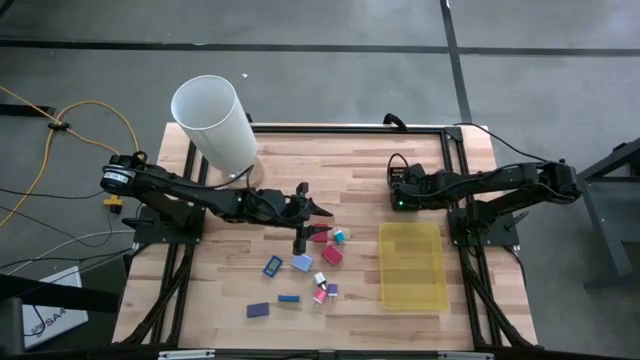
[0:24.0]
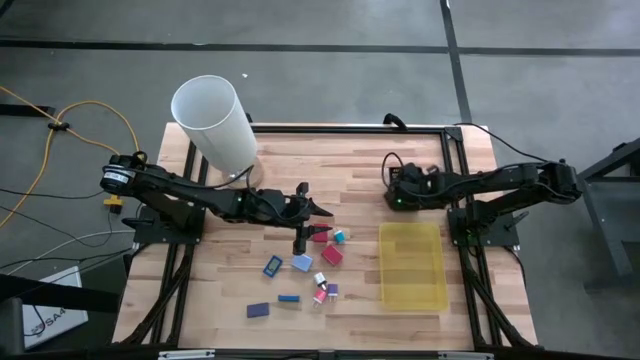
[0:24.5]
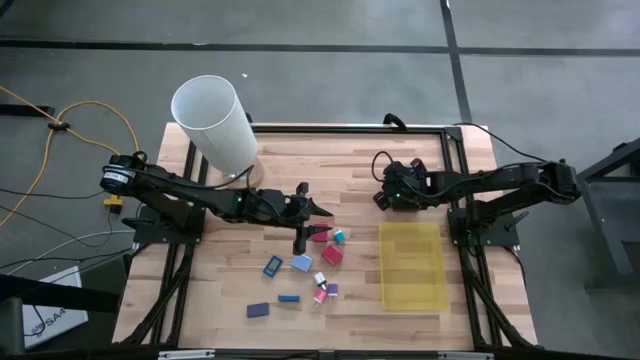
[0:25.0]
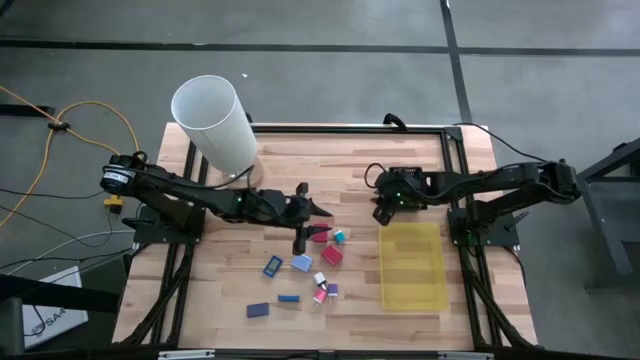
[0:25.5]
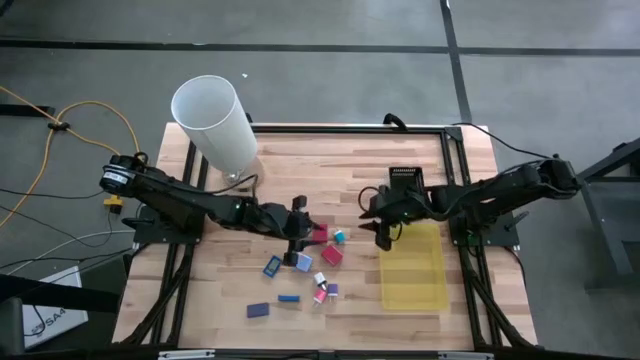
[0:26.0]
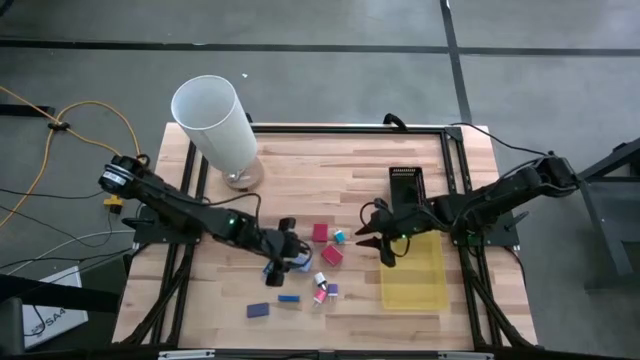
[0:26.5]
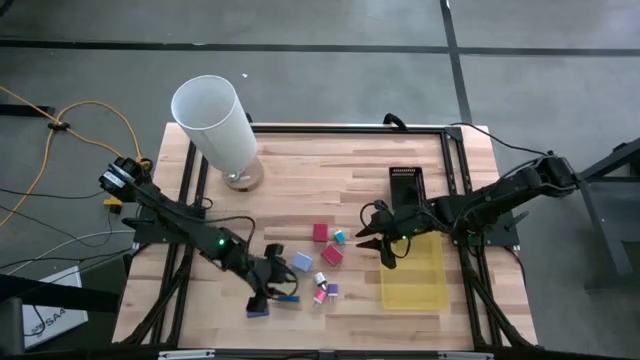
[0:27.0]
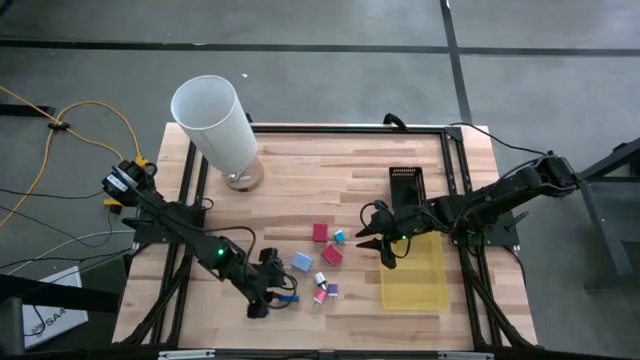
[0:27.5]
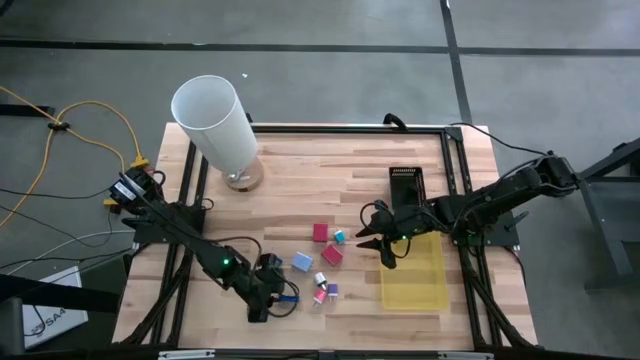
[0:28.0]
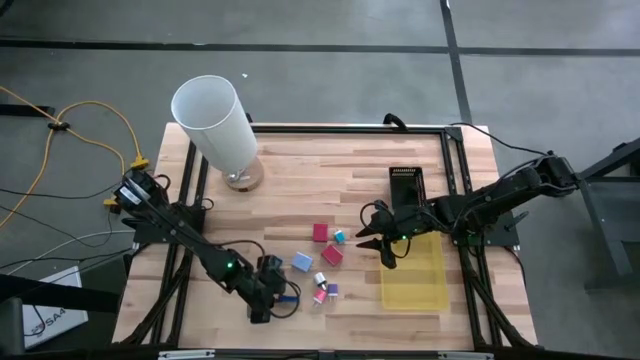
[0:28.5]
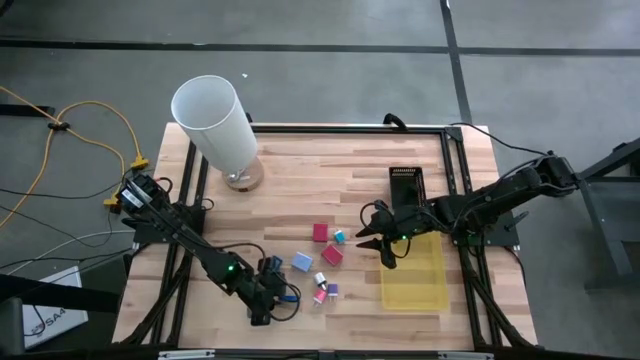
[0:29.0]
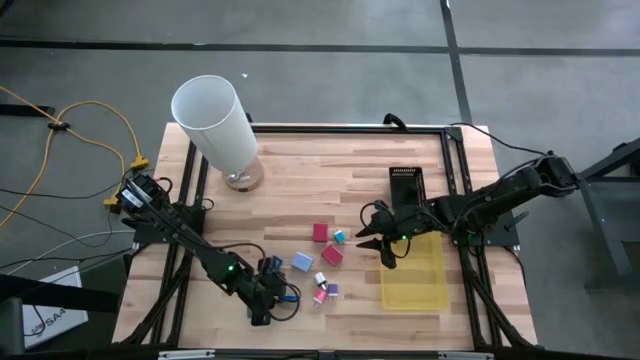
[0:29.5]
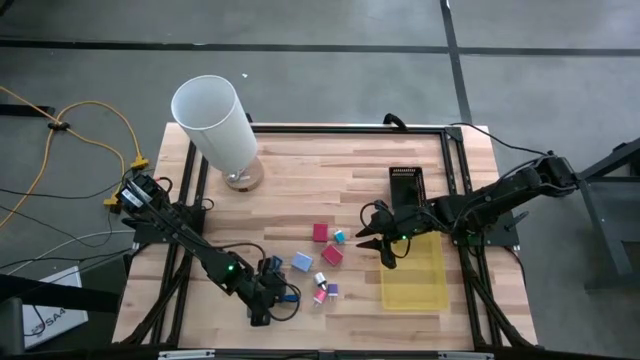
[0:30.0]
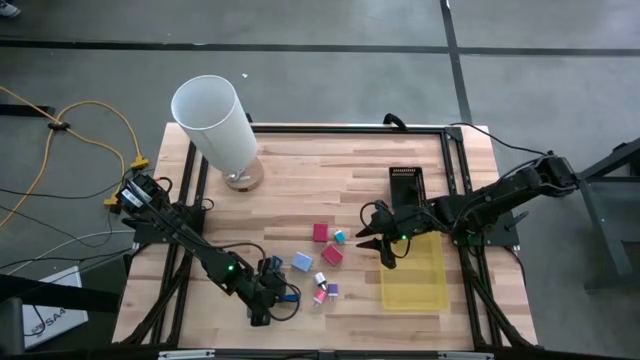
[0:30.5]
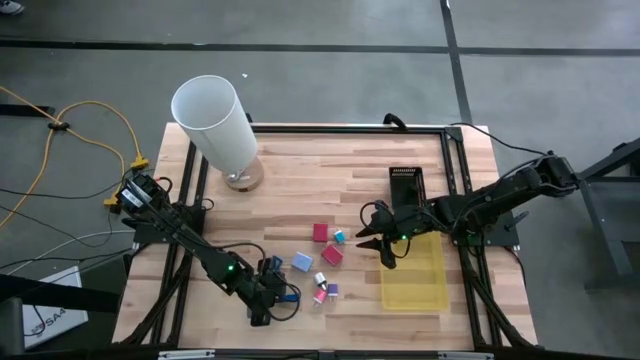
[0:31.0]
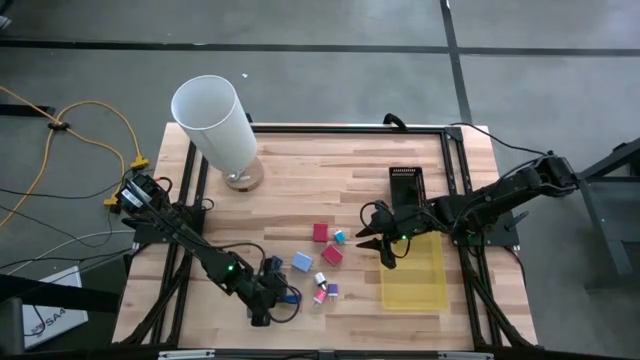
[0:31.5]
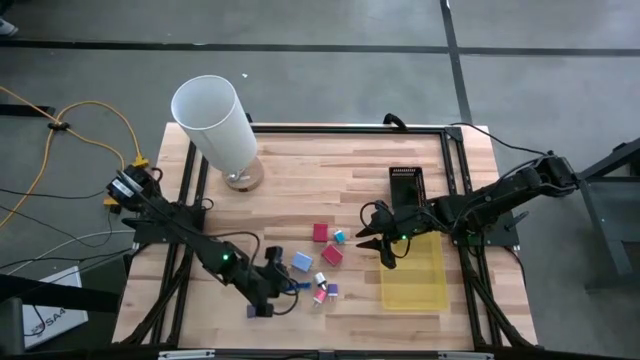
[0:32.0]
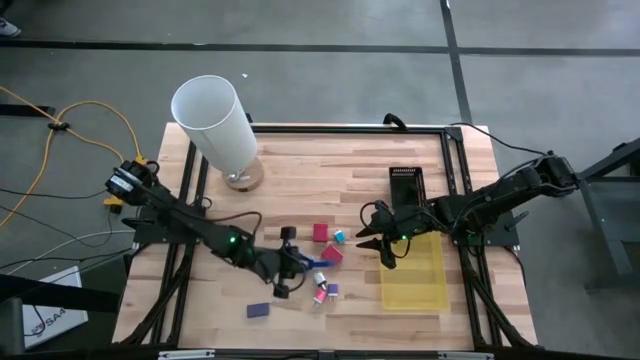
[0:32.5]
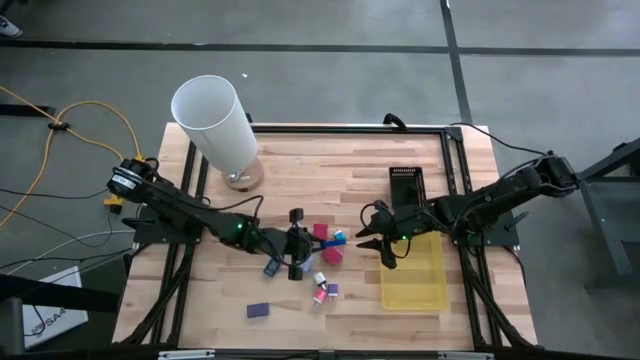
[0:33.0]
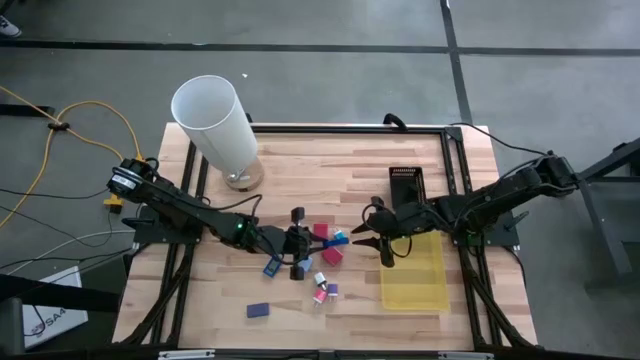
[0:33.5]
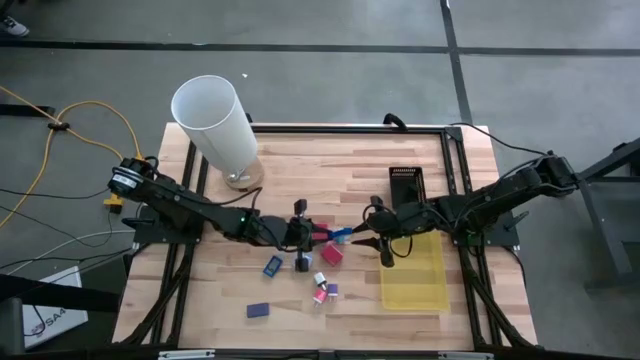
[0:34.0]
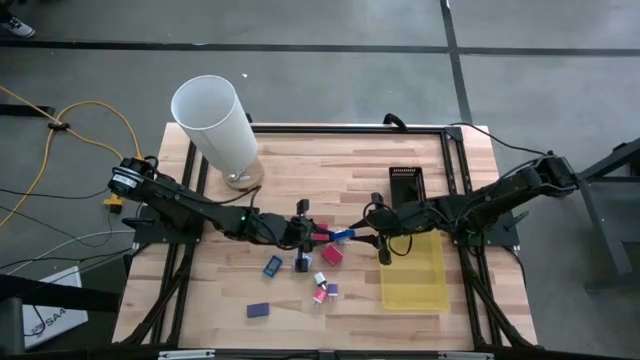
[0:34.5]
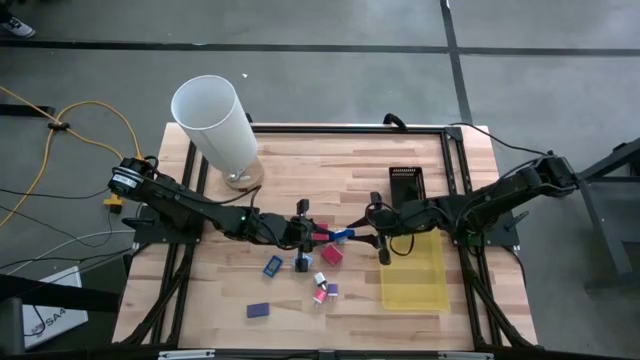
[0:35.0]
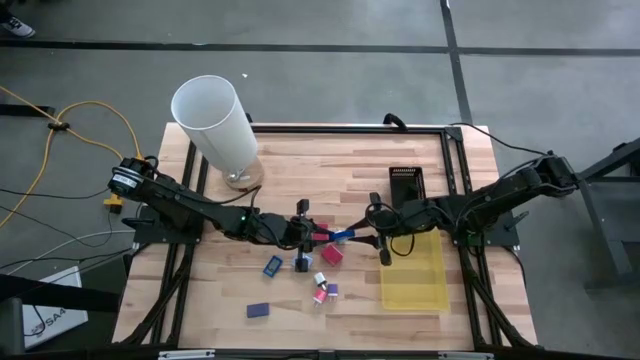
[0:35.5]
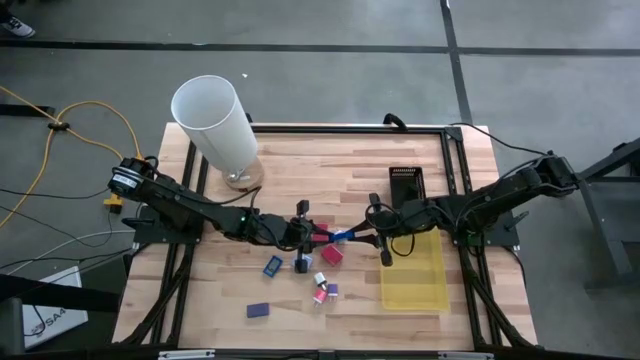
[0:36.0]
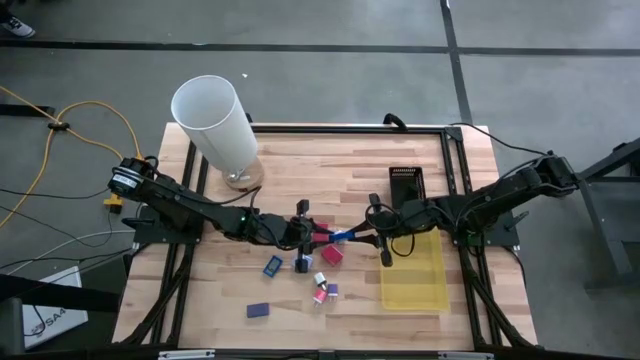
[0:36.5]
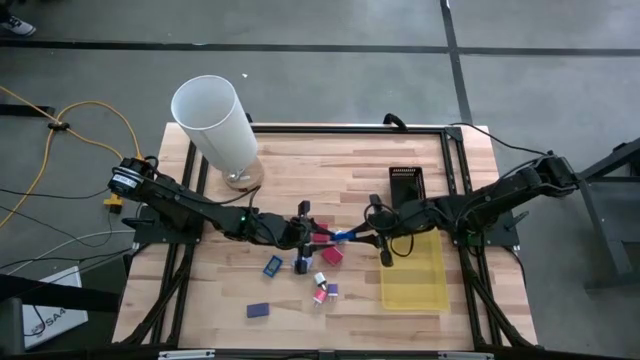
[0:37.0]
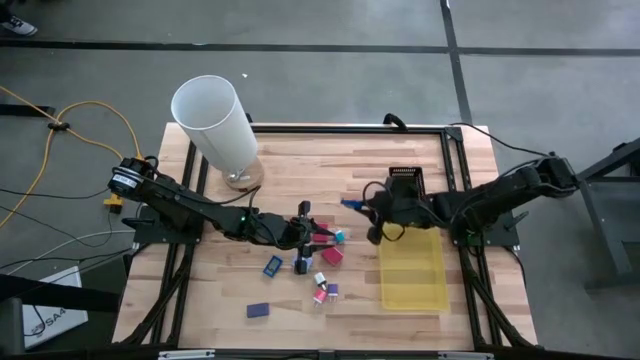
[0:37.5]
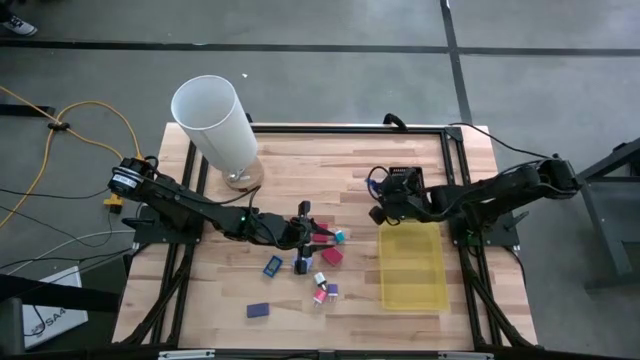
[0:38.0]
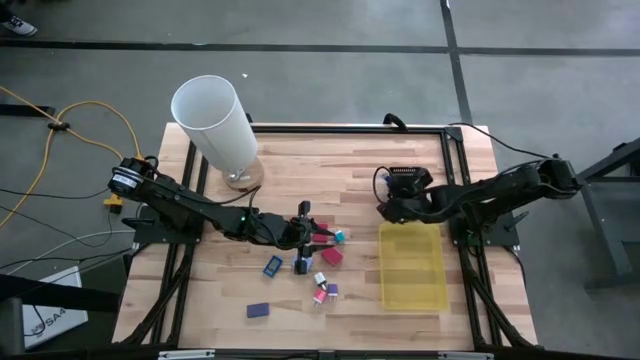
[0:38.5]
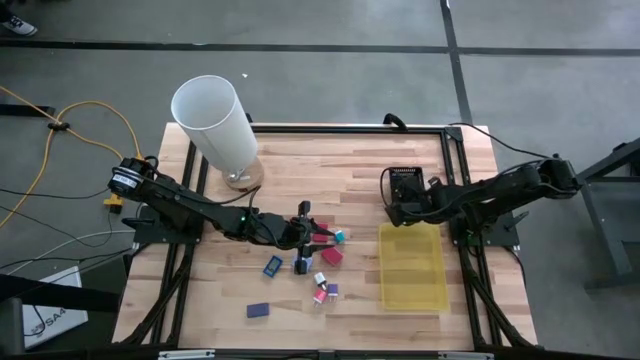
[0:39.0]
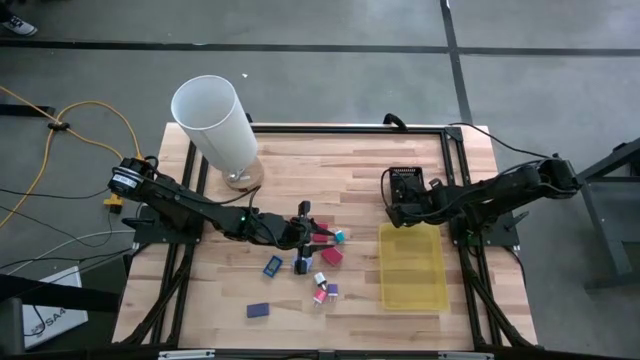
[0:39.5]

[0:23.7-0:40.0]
Task: Pick & Place Office items
Put bottom right blue digital clock into the black bin

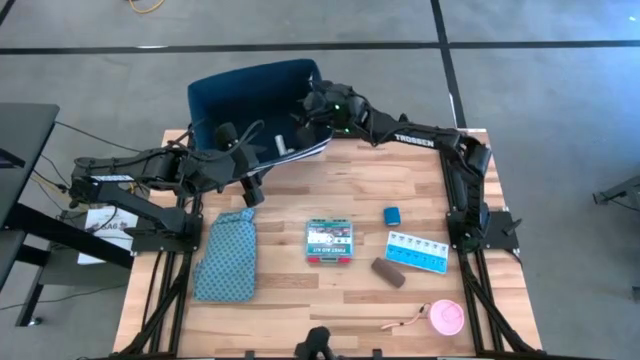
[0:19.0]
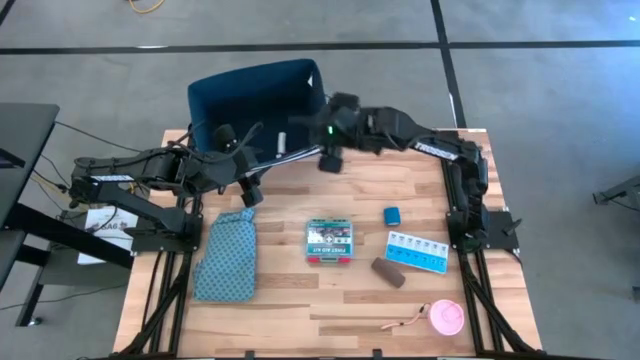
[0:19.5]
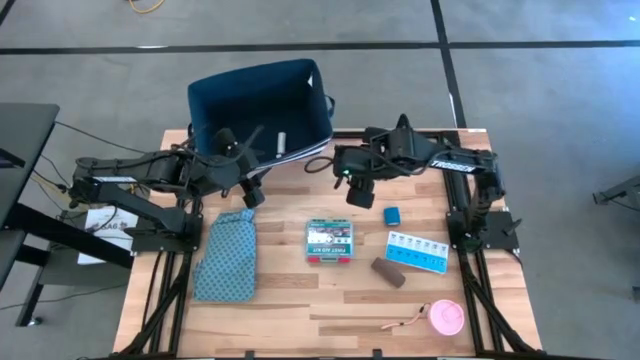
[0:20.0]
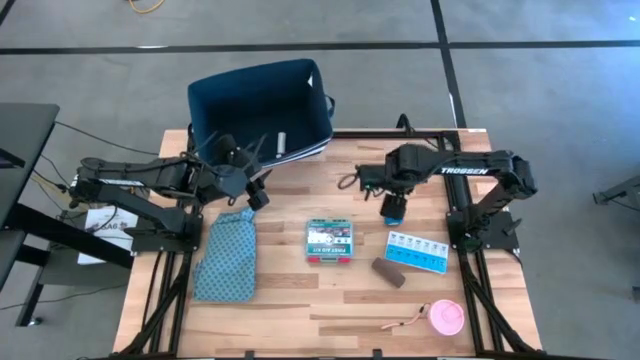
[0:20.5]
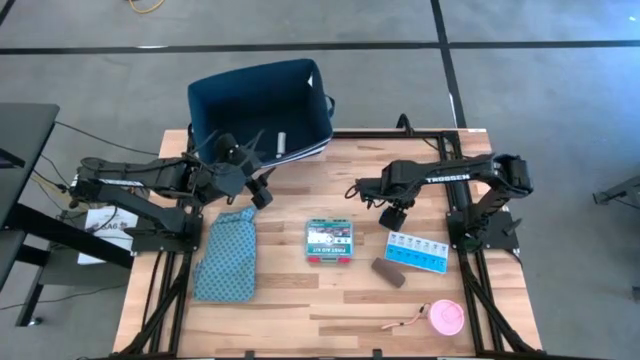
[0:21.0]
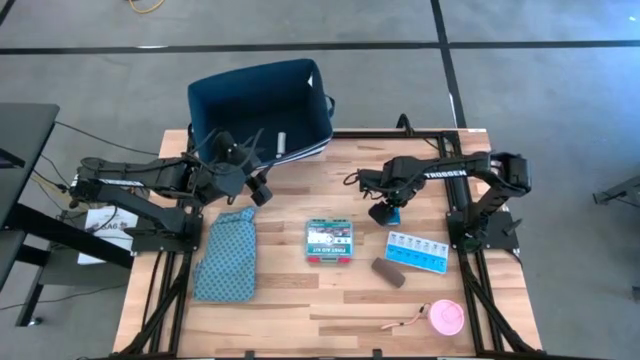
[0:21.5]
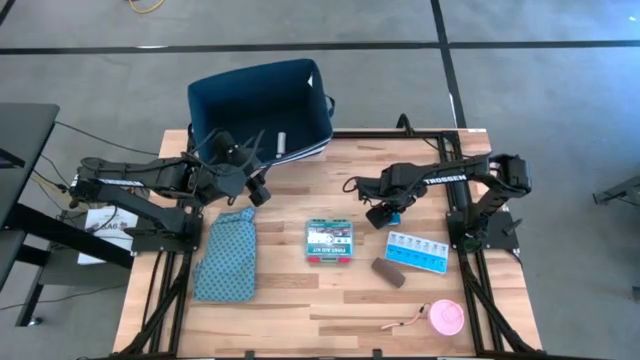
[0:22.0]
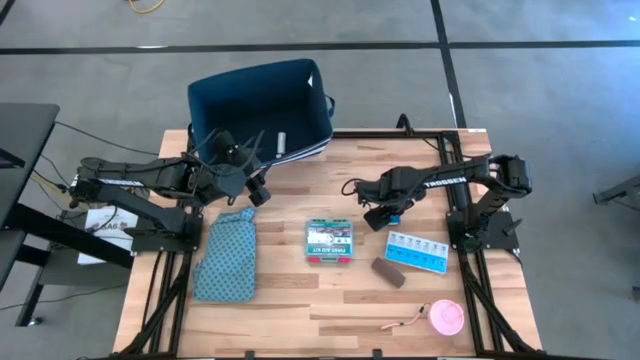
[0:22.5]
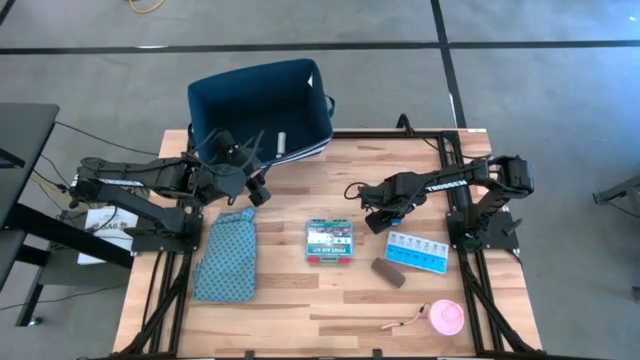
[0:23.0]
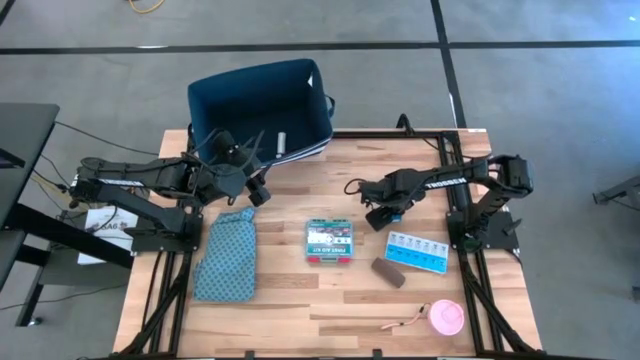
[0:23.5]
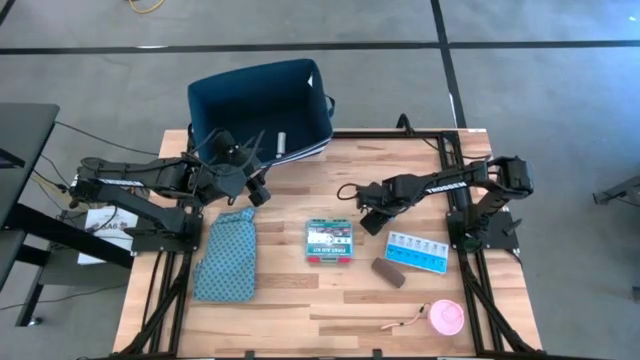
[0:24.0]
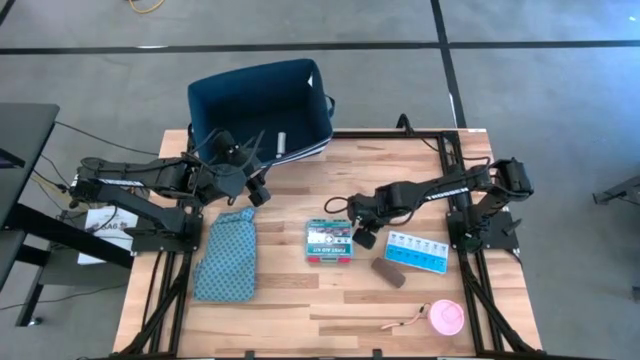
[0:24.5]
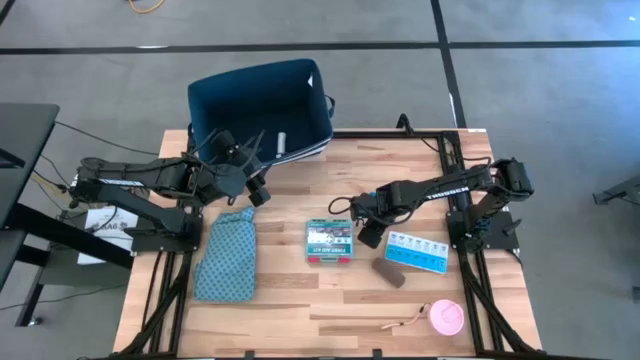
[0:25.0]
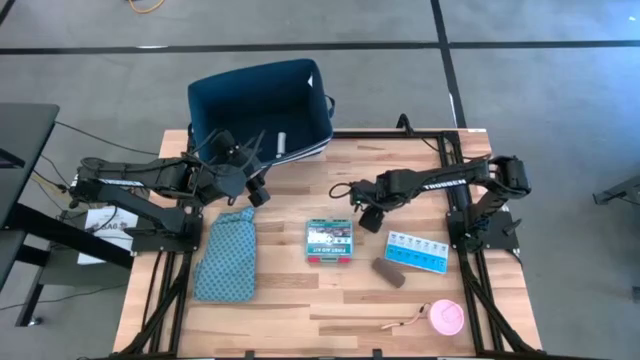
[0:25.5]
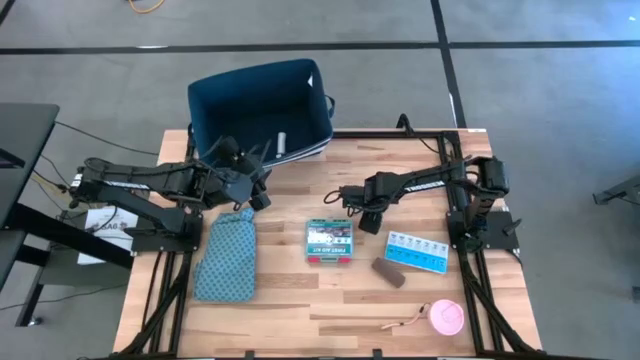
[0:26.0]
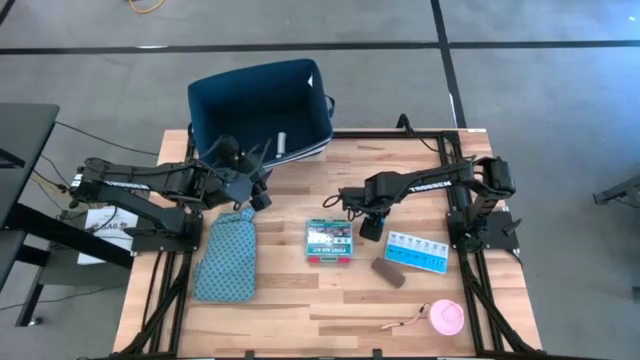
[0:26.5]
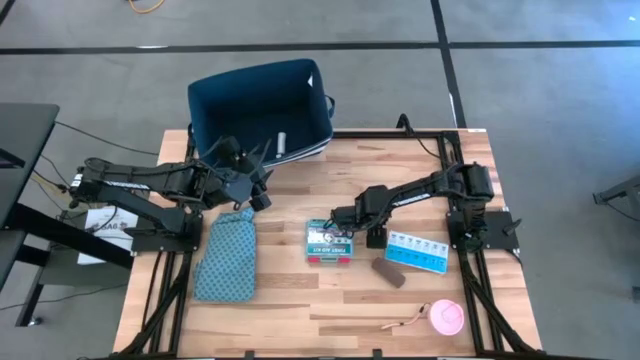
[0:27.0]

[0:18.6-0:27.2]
Task: Pick & place medical supplies in basket/bin
Put the blue bandage into the blue bin
